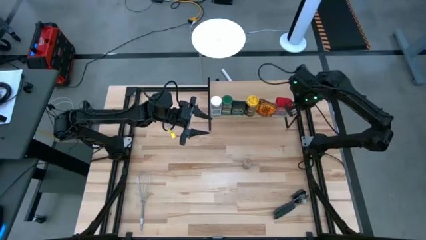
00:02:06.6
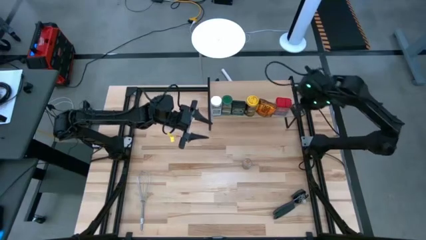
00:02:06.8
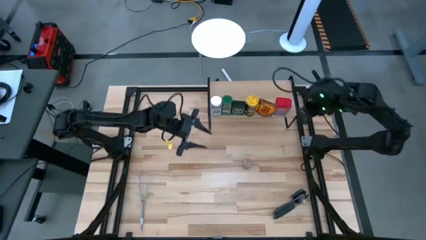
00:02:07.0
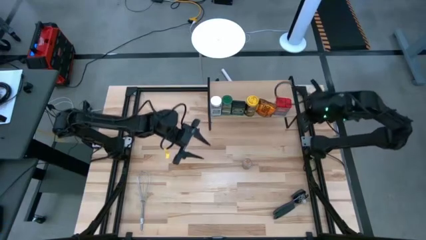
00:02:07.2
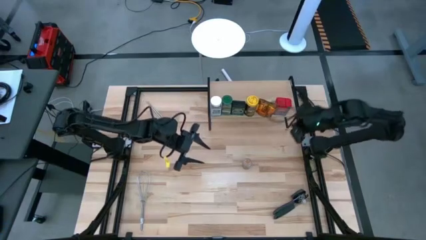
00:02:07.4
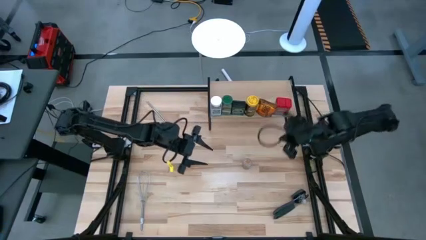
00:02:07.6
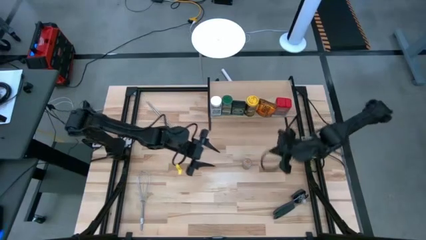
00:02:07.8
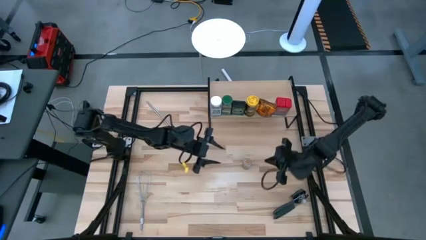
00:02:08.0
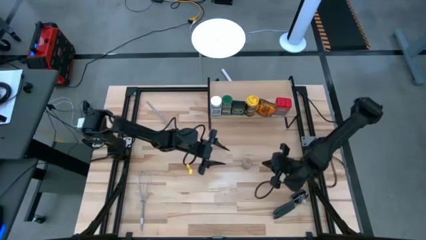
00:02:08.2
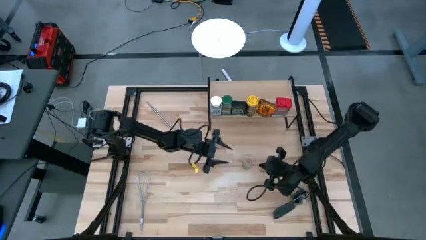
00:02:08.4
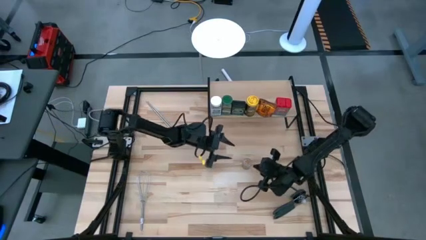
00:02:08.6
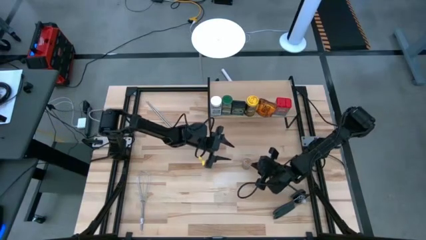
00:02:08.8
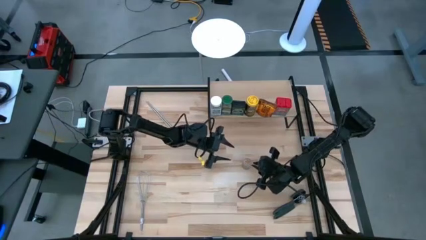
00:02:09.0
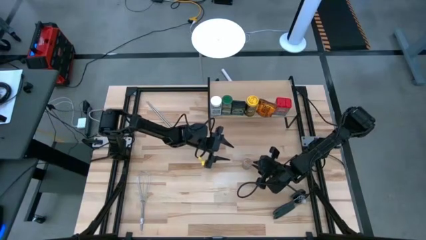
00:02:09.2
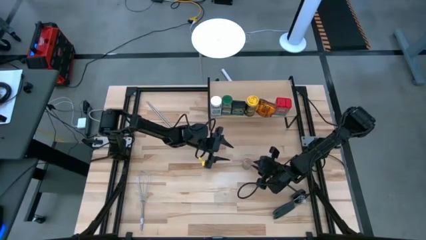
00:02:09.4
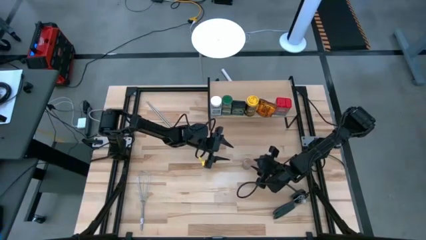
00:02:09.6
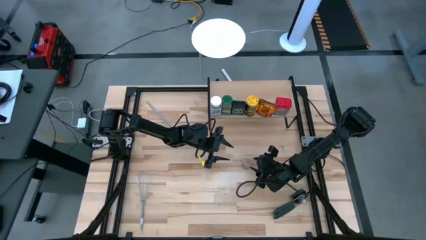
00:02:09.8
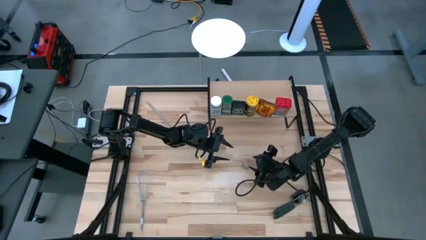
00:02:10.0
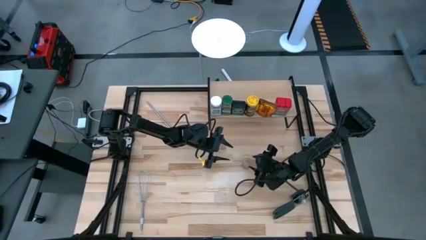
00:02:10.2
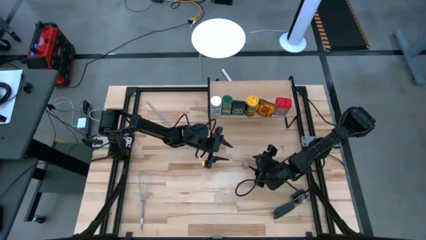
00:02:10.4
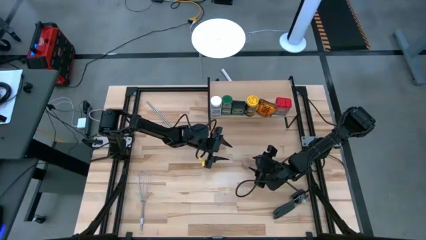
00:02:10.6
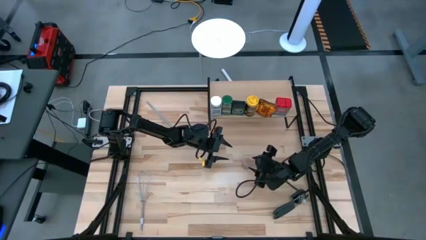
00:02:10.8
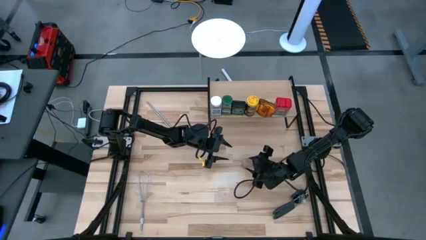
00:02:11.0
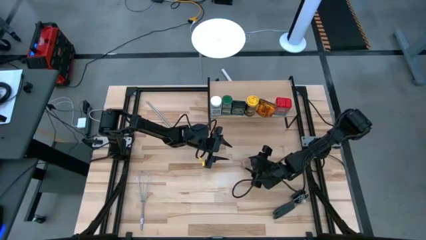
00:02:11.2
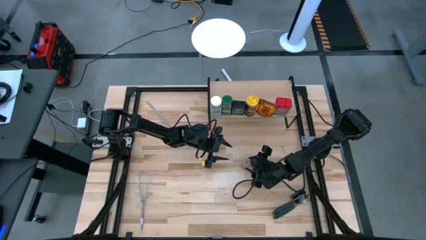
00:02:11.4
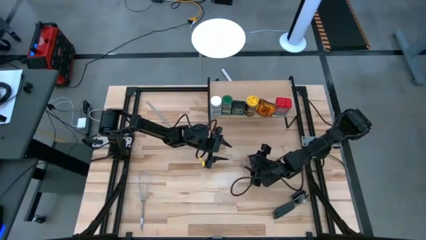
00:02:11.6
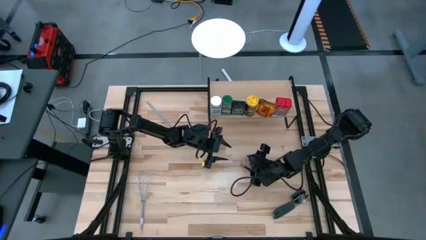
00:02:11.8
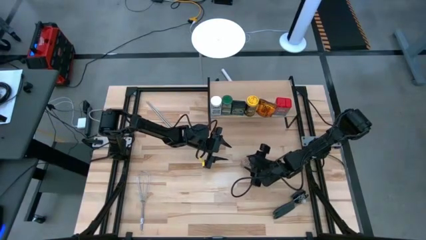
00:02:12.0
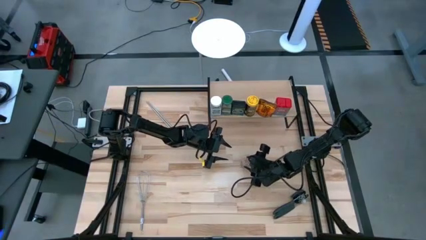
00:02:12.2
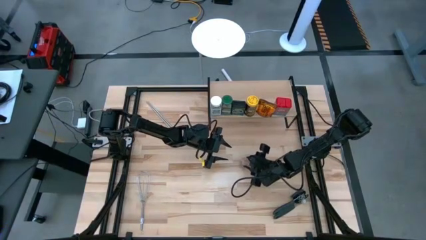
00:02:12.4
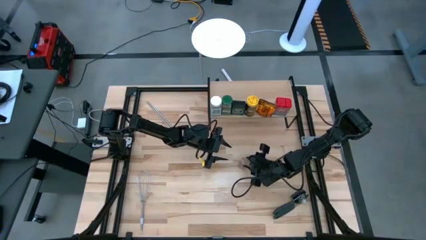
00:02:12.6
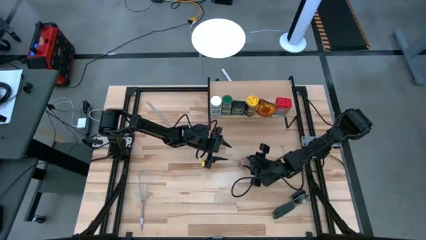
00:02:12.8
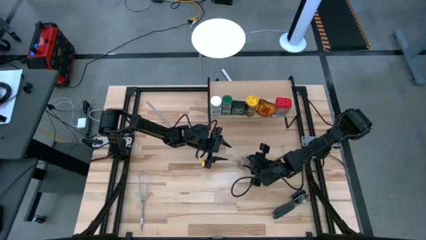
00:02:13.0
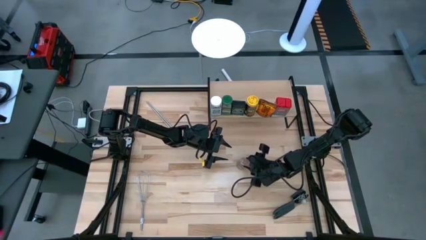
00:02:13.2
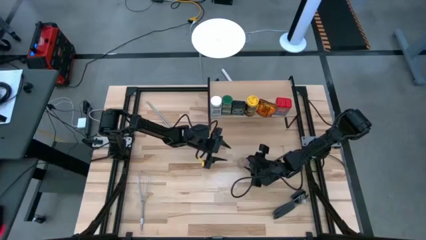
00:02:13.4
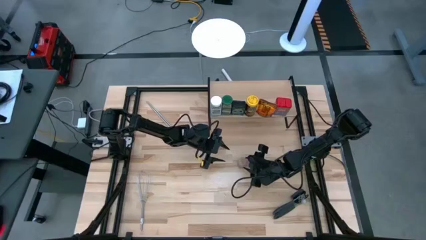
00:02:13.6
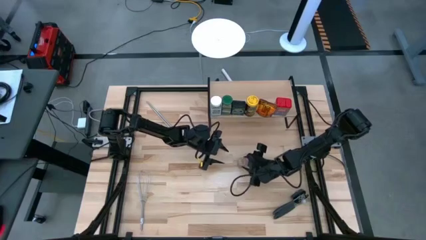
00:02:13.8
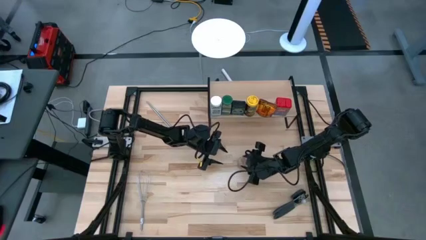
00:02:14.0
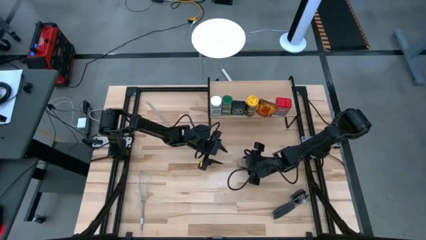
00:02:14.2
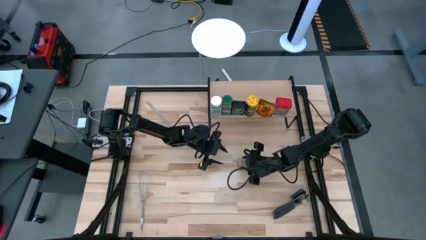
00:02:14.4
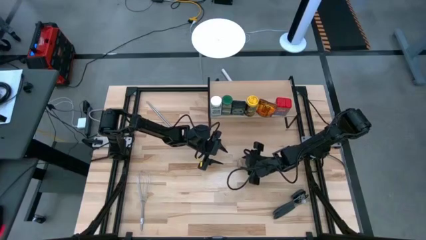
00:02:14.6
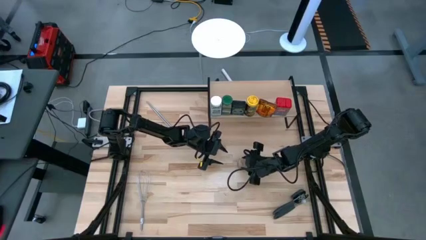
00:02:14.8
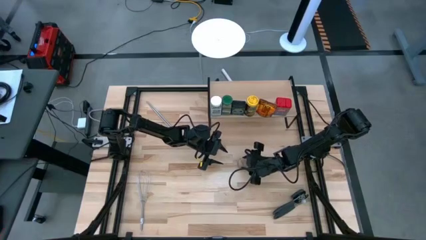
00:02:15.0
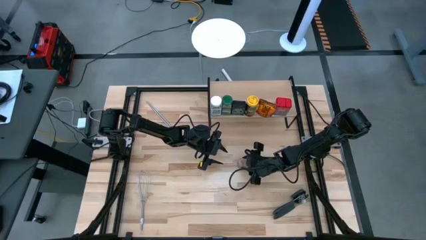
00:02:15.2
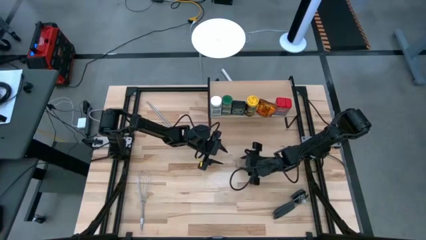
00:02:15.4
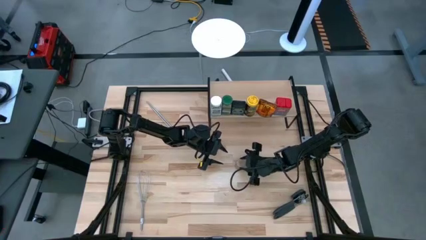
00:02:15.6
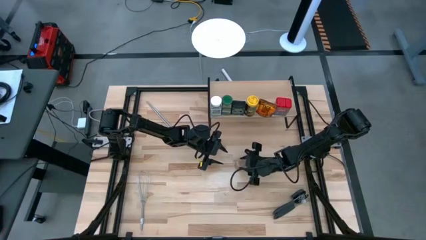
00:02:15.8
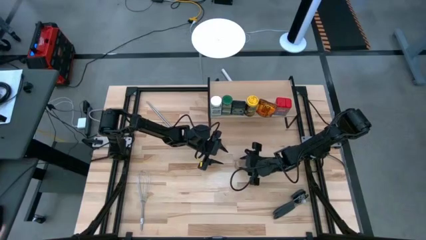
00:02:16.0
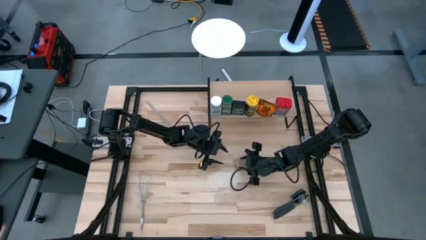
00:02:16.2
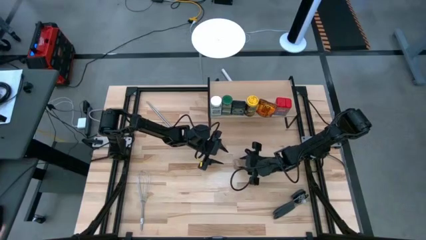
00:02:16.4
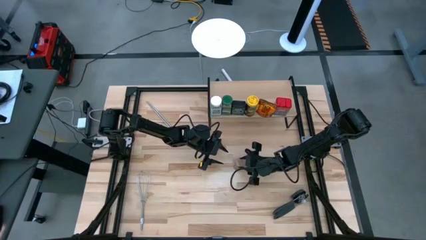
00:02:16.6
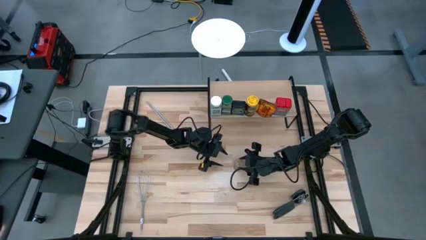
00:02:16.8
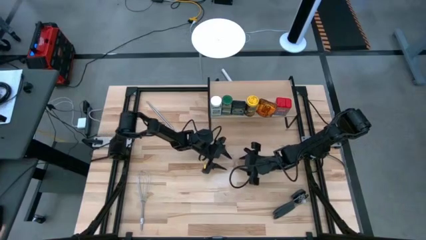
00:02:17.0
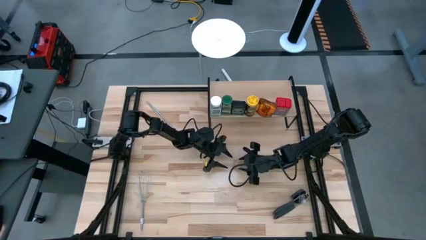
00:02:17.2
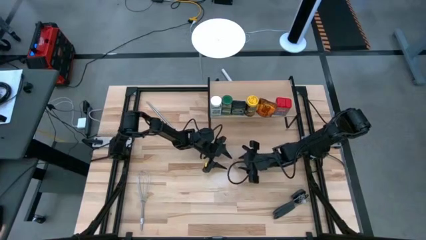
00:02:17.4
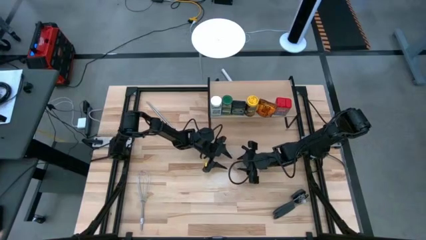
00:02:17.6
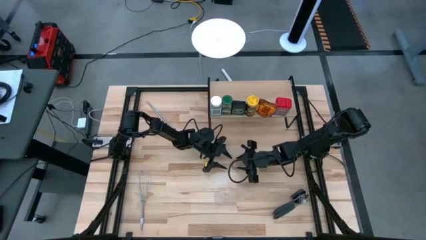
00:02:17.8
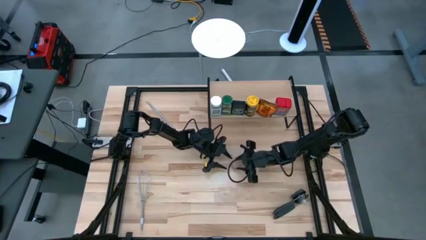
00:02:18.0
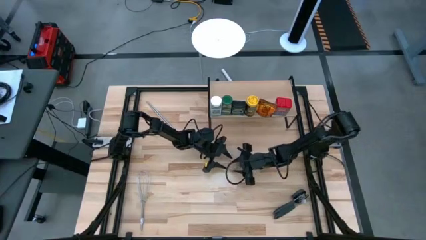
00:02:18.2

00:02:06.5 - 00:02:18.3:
Task: Shelf spices
Put the transparent seasoning bottle on the shelf

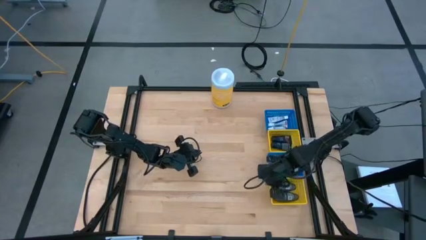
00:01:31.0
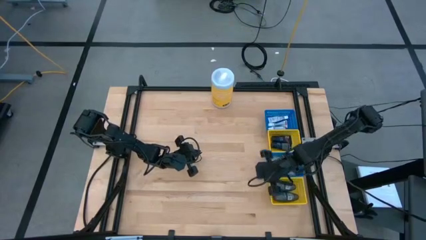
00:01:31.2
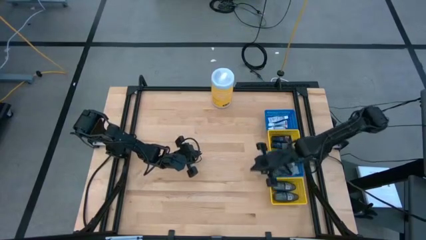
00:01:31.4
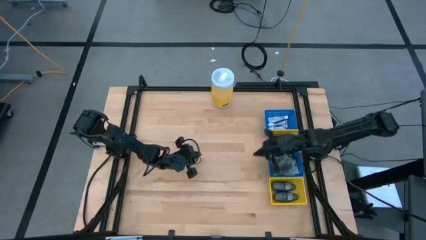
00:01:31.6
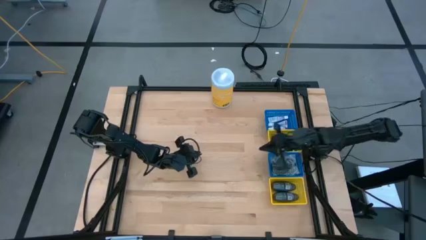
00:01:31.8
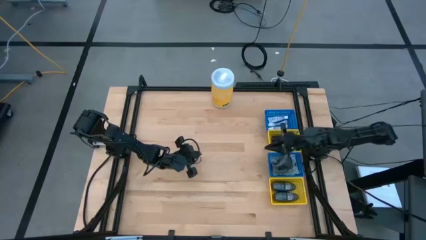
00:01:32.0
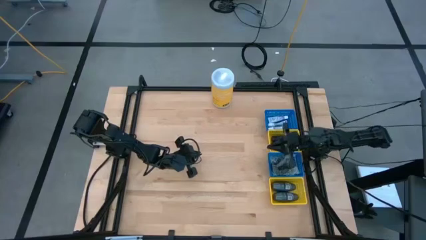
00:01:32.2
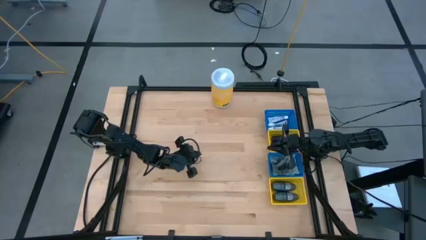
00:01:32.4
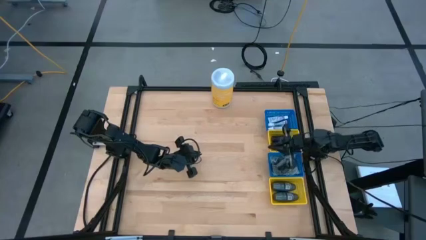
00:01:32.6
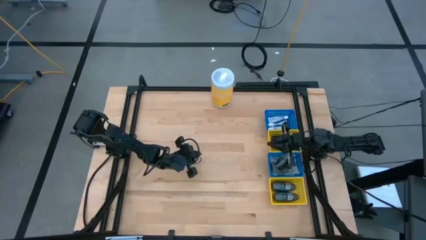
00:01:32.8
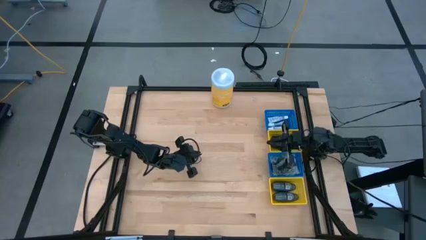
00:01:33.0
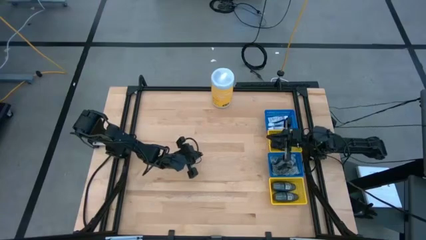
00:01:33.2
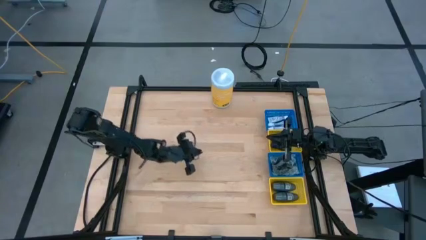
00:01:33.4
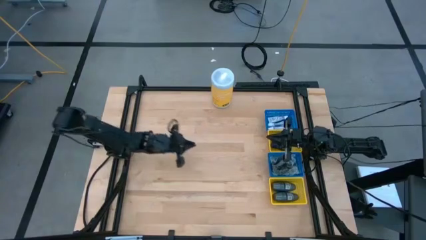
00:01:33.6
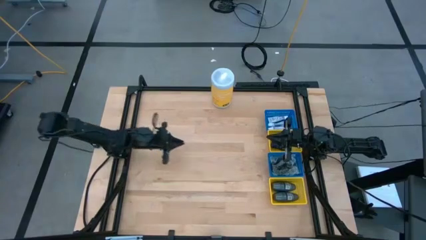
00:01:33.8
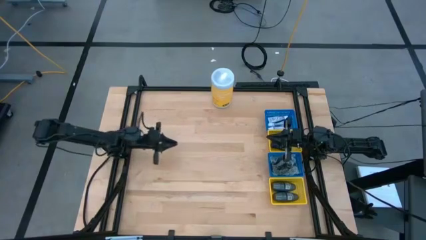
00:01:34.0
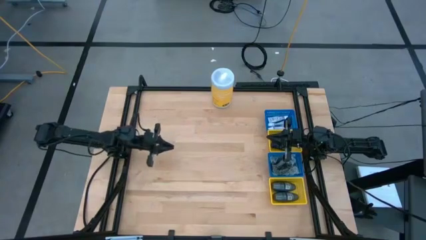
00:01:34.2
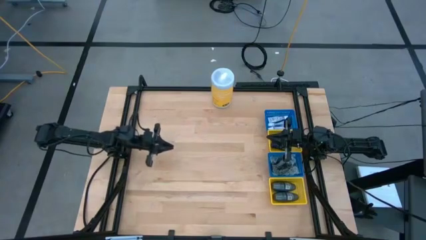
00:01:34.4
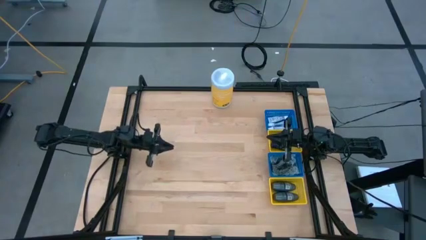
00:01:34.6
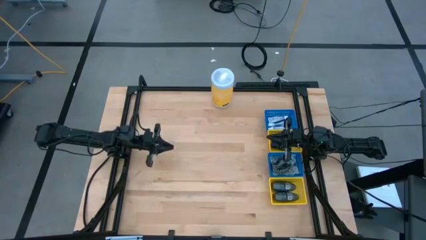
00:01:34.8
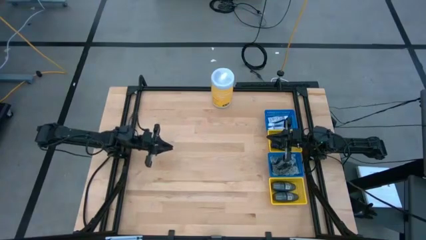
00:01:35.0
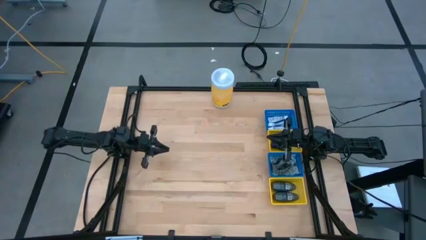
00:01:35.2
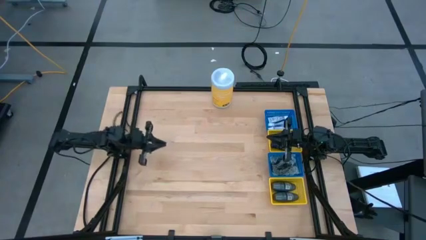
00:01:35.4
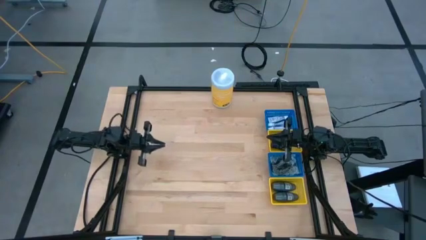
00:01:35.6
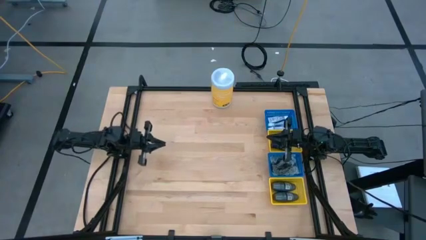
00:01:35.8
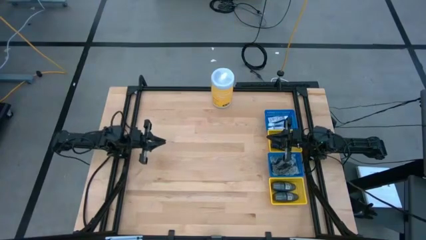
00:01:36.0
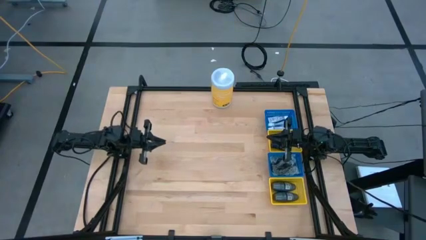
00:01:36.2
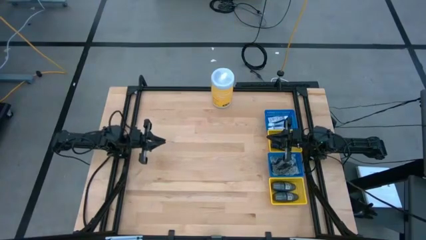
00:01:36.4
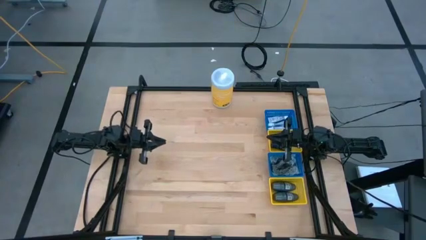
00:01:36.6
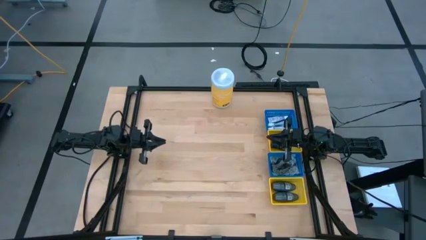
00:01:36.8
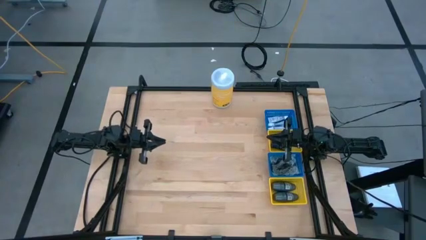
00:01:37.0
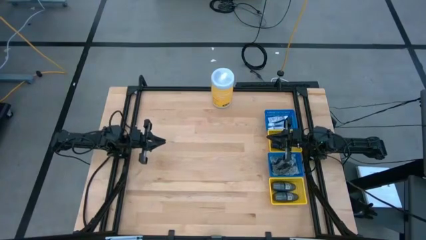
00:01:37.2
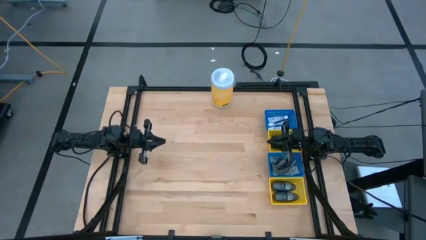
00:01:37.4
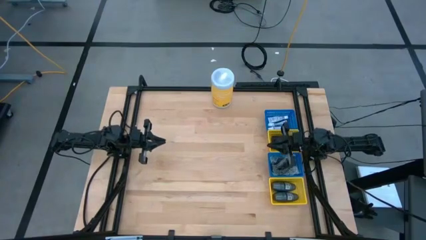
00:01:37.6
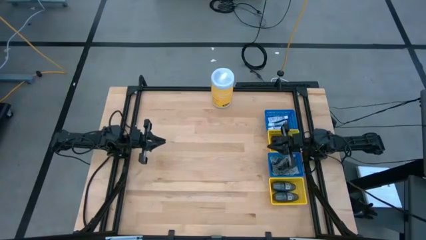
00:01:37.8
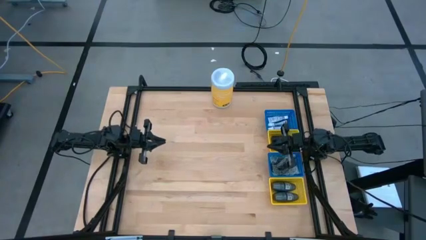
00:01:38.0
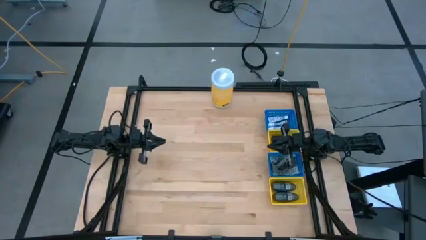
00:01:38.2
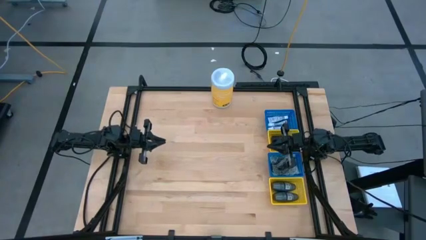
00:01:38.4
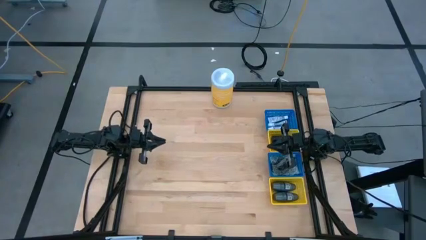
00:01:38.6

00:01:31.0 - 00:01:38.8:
Task: Pick & Place Travel size toiletries
Return to Home Position
